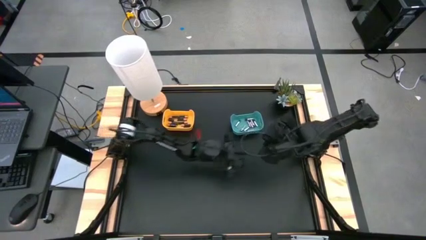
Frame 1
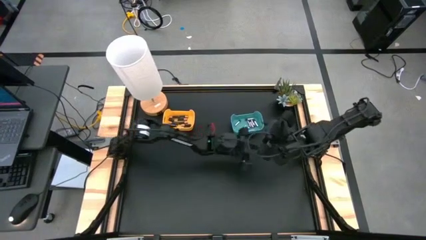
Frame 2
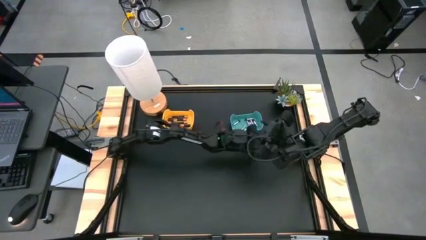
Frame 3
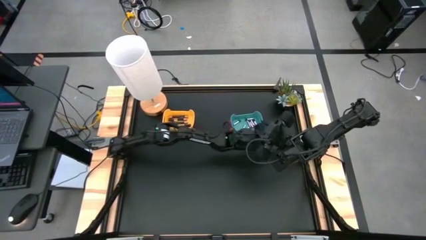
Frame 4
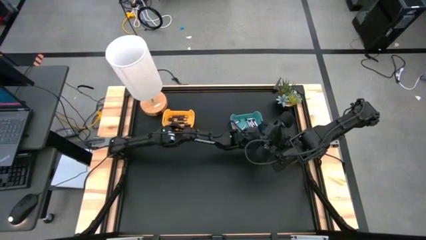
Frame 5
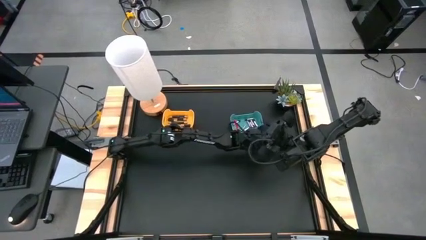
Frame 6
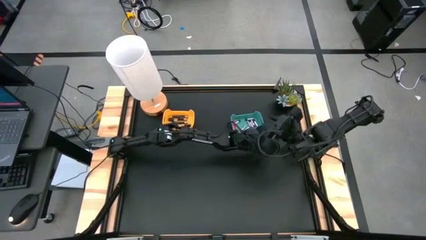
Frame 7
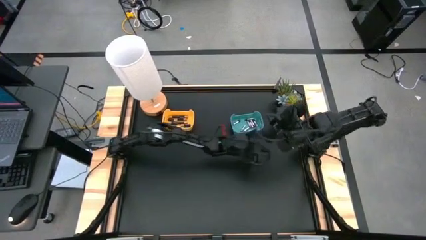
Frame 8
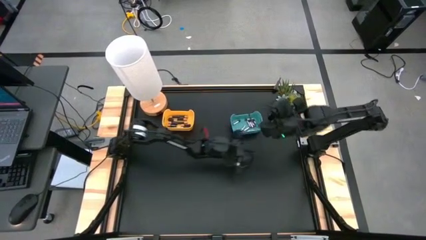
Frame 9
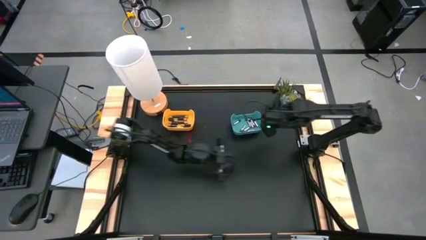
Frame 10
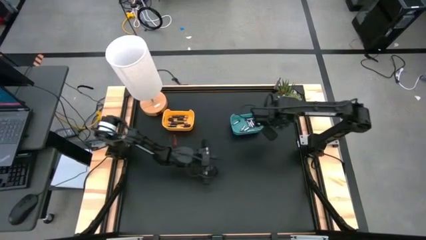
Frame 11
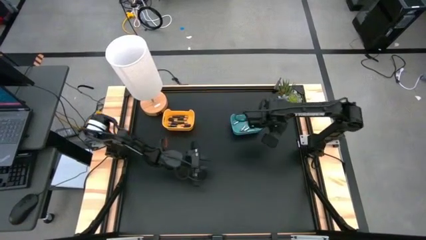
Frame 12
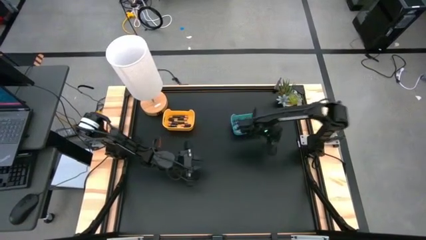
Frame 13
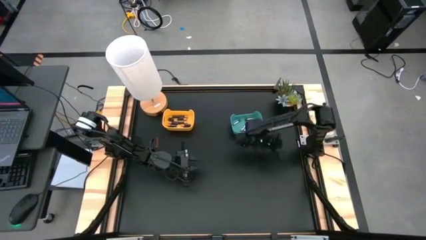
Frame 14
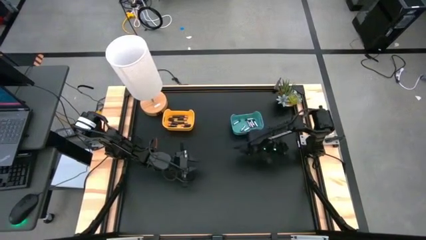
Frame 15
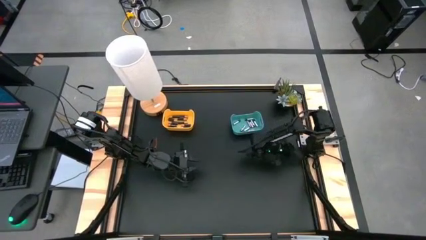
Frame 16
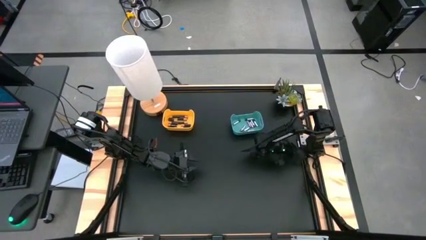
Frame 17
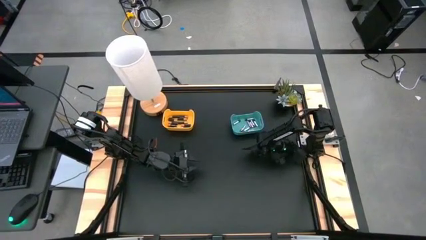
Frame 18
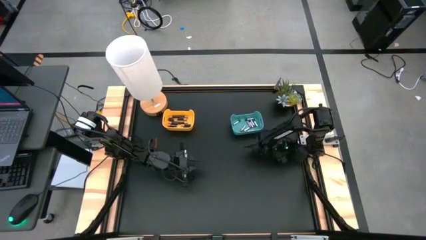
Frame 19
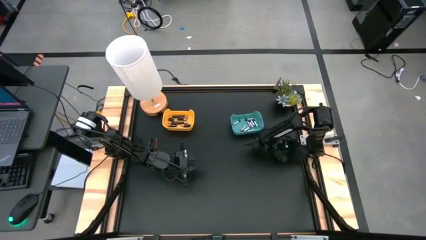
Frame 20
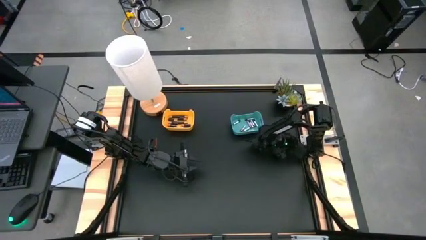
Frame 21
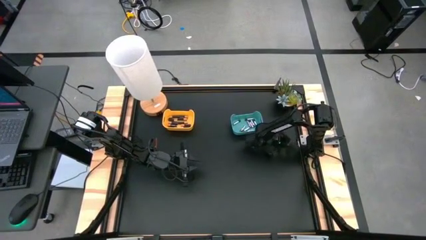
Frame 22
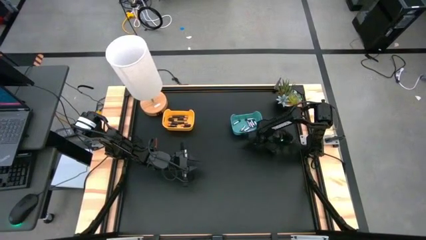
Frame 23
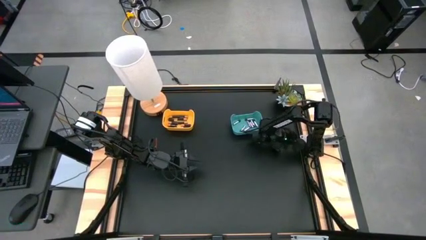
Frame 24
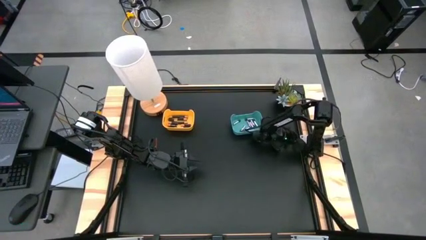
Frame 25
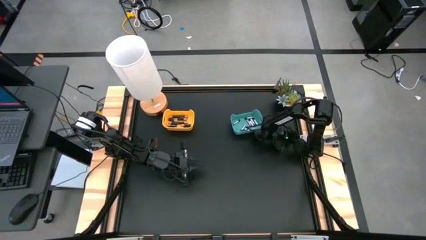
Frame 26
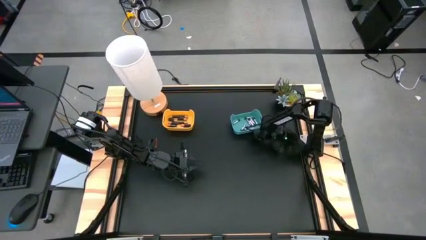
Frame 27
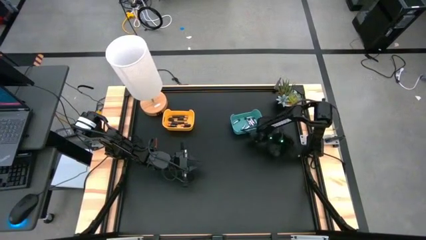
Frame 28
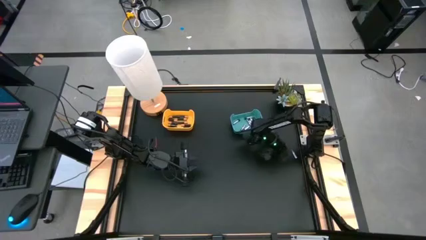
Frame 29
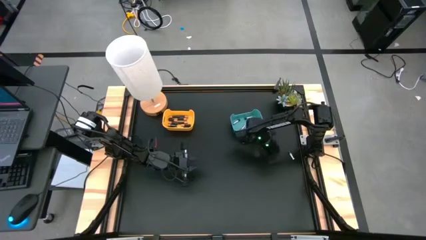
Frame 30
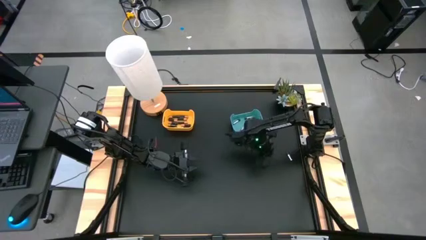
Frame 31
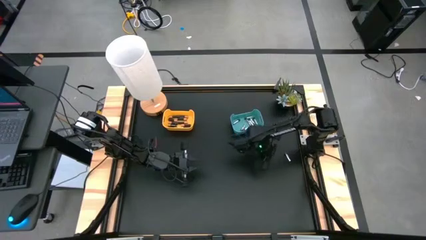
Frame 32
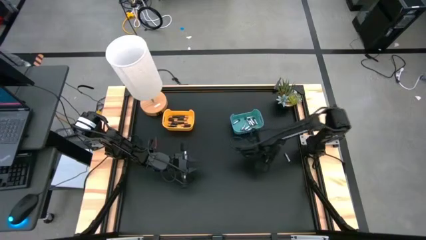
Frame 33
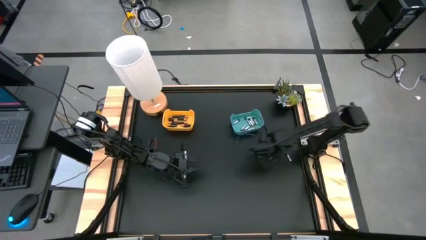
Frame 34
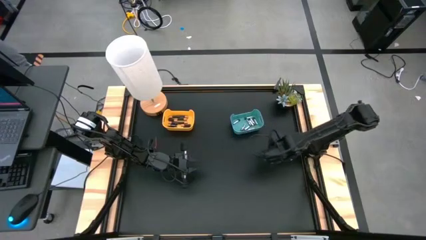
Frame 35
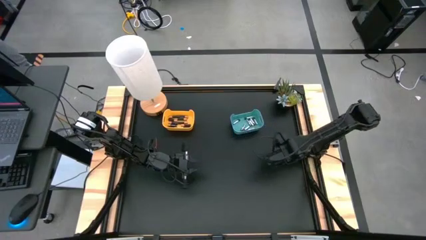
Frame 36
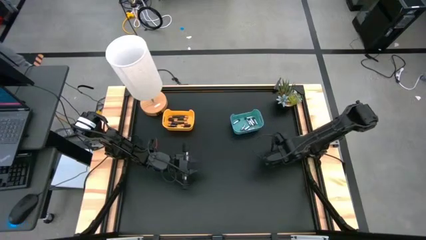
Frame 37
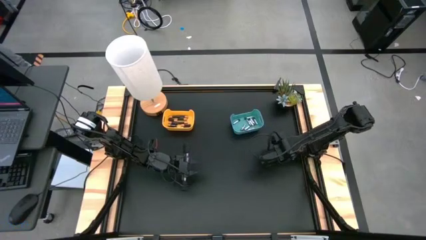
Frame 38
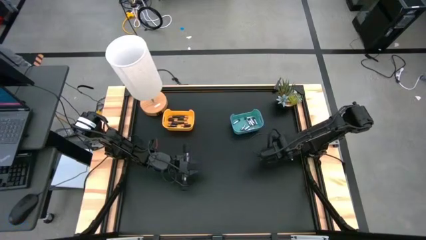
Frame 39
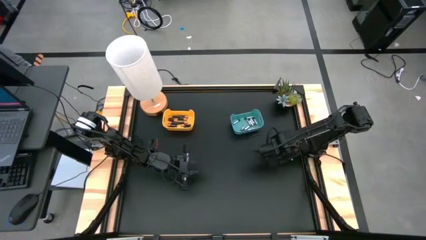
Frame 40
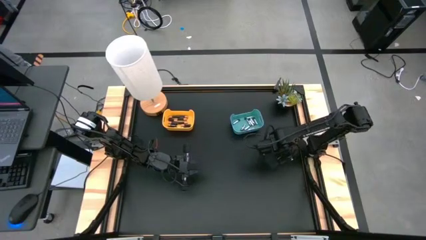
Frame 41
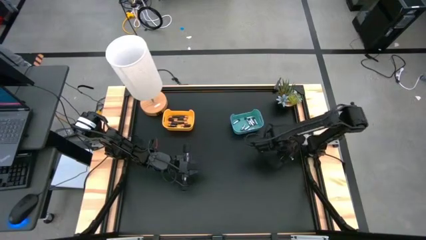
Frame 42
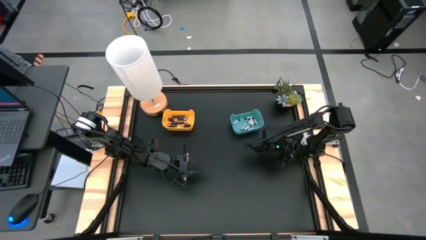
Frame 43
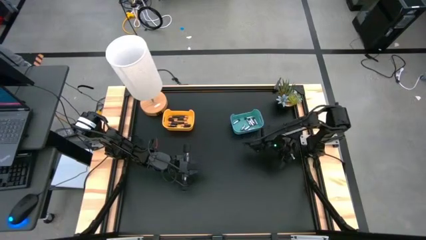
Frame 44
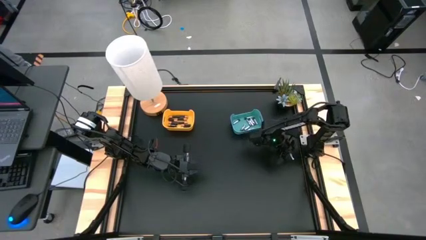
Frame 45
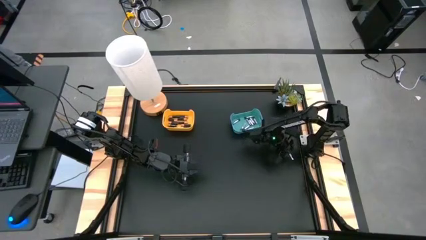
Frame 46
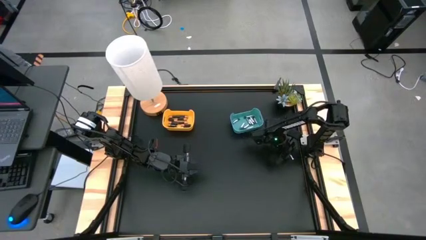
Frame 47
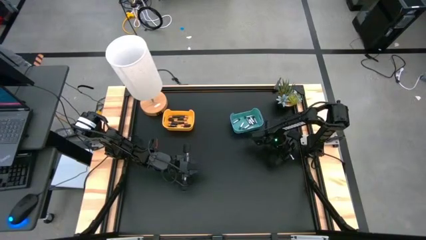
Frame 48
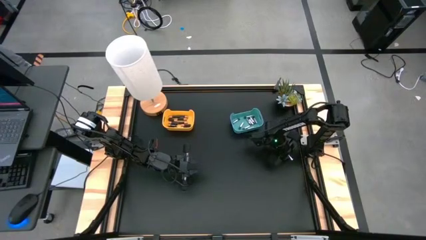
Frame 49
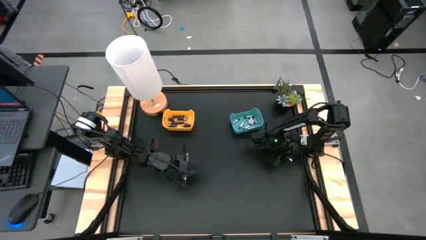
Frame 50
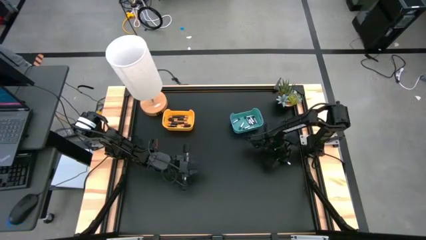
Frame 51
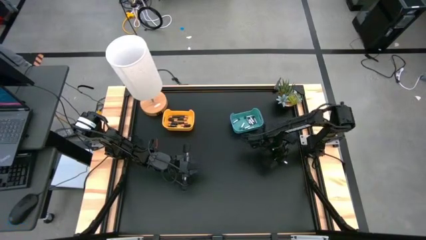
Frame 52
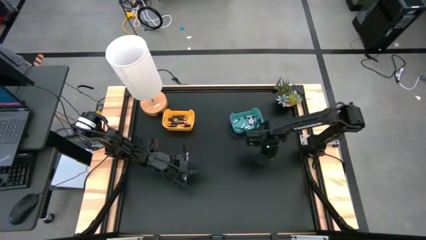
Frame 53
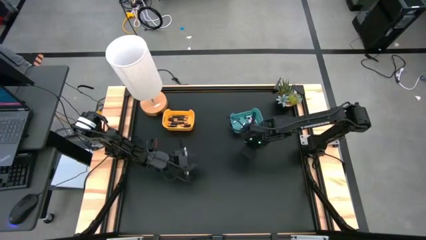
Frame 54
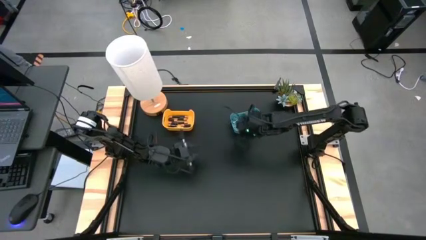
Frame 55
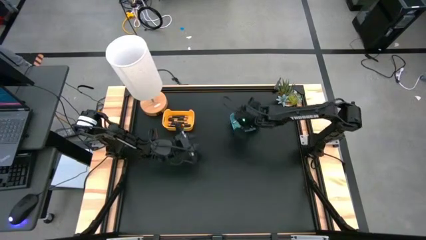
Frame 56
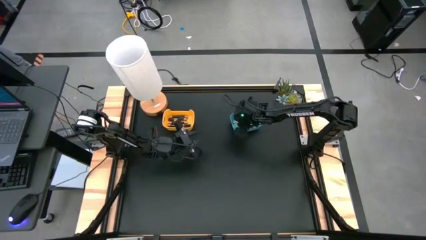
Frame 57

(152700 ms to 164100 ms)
Task: Sort batteries
Put the silver battery into the blue bin

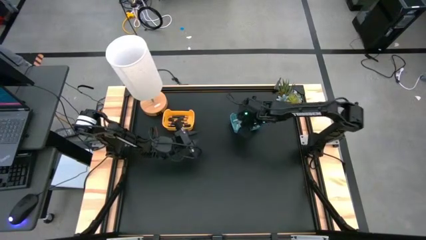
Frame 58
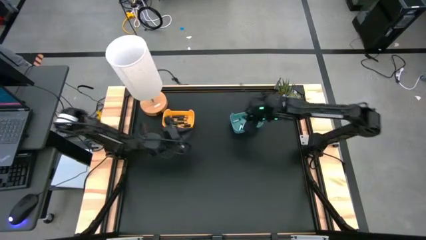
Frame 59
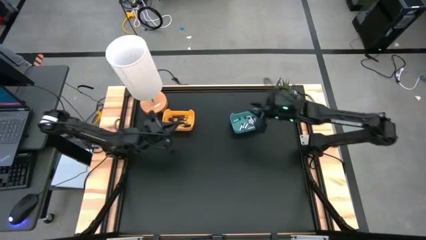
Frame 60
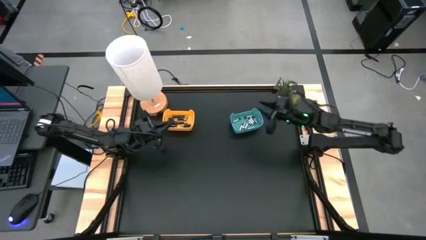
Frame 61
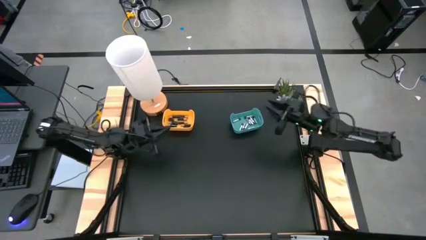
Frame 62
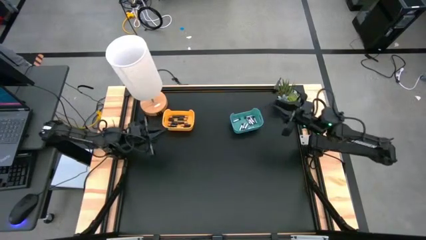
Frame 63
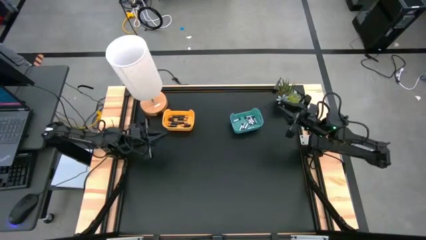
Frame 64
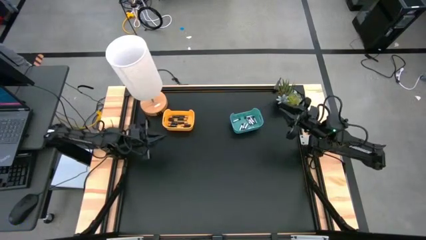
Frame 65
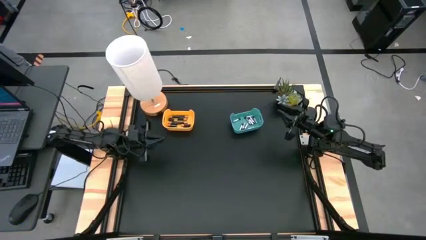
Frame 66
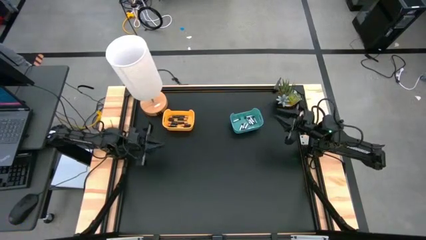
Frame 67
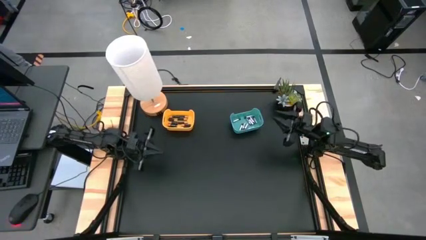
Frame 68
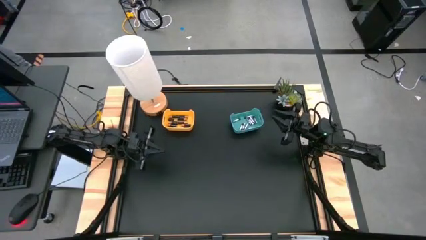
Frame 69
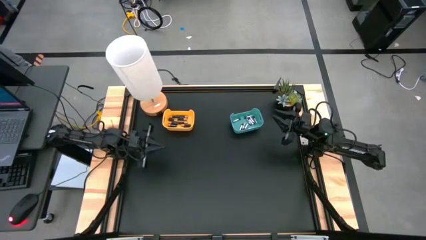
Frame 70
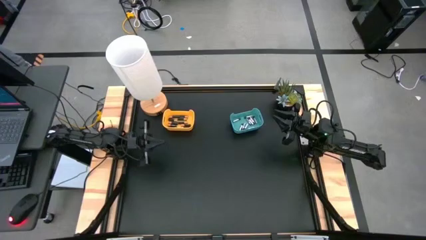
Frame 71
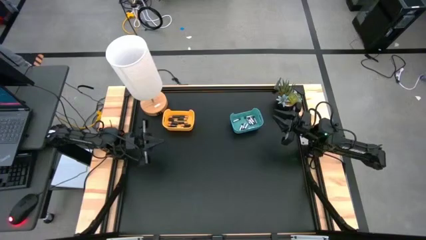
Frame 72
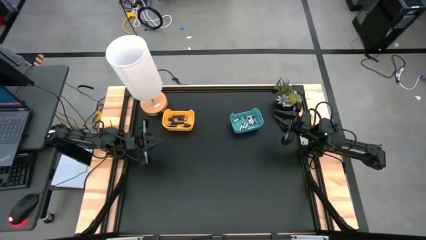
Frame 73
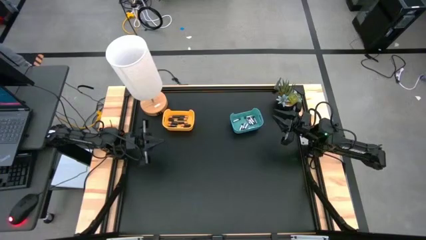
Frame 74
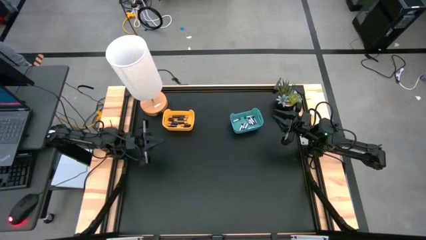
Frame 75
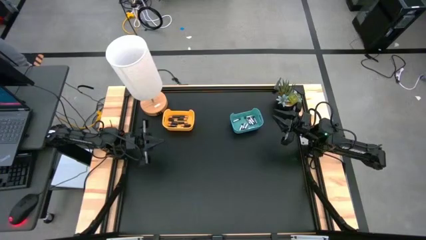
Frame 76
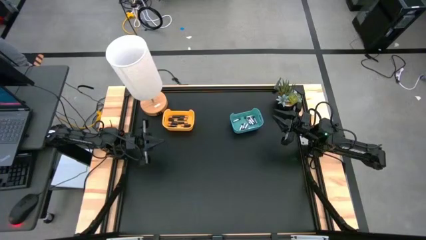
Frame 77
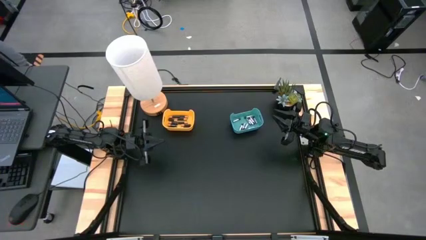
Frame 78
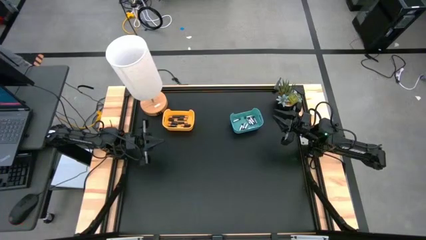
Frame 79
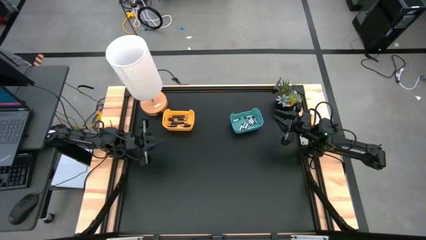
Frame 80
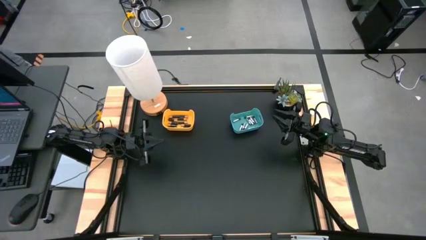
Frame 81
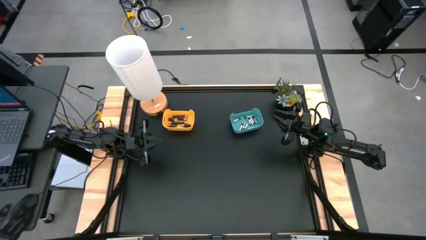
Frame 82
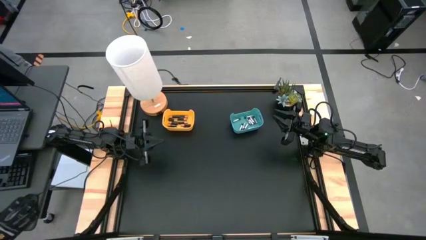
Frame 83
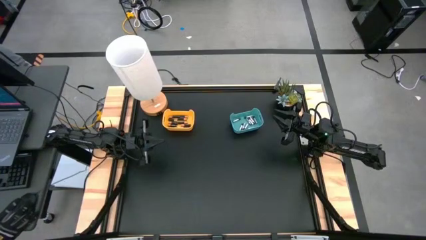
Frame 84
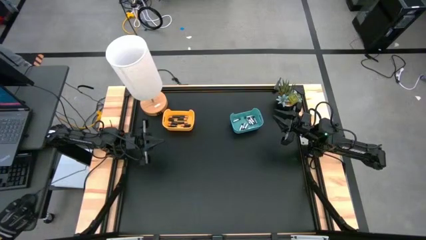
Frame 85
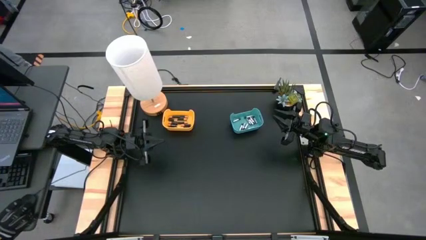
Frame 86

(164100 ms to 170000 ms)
Return to home position
